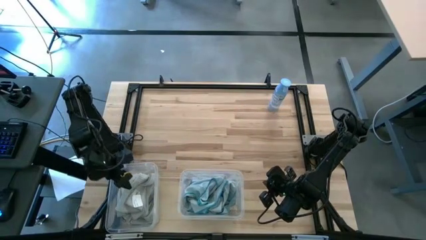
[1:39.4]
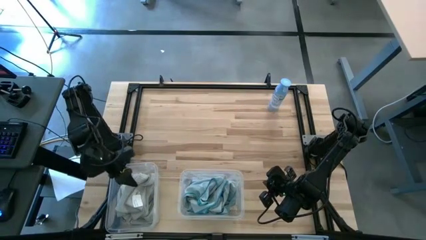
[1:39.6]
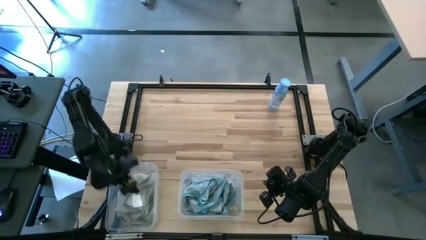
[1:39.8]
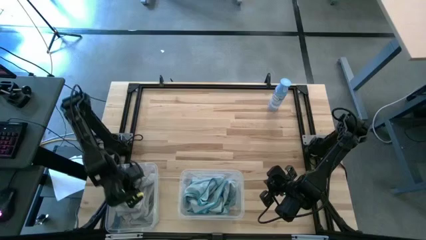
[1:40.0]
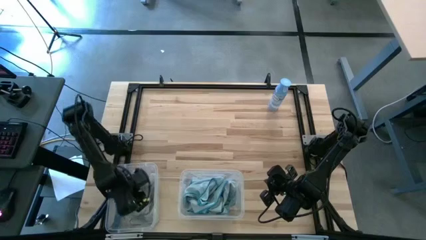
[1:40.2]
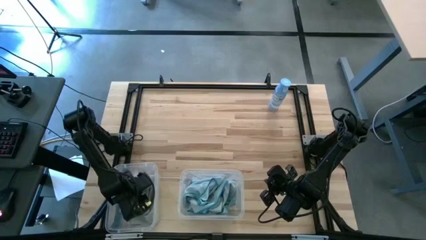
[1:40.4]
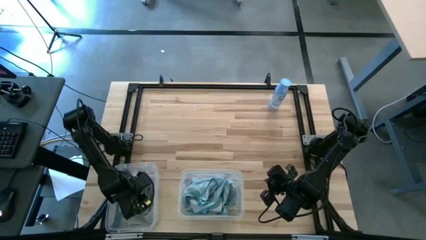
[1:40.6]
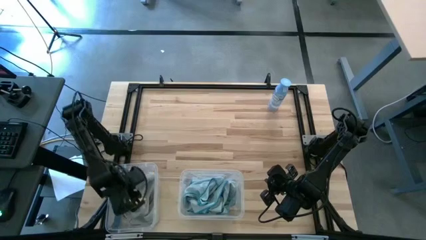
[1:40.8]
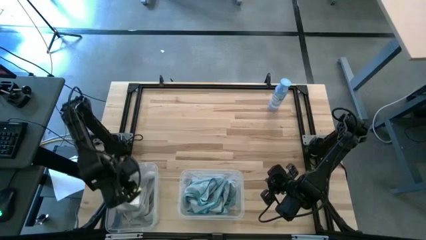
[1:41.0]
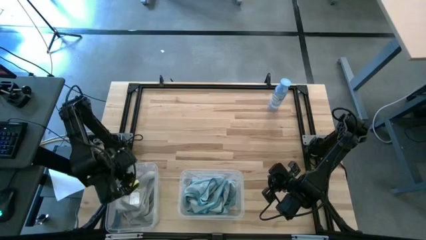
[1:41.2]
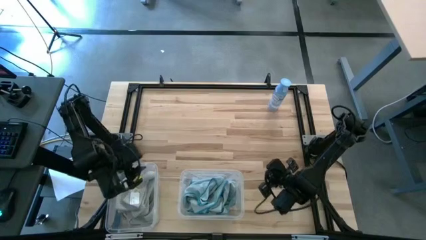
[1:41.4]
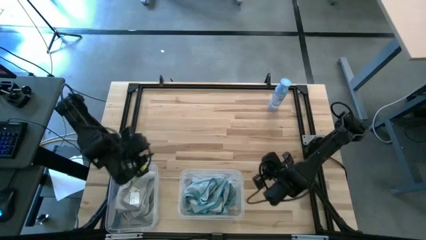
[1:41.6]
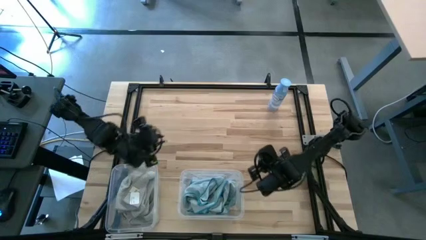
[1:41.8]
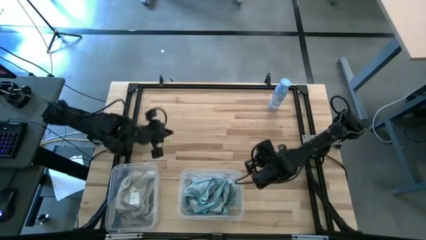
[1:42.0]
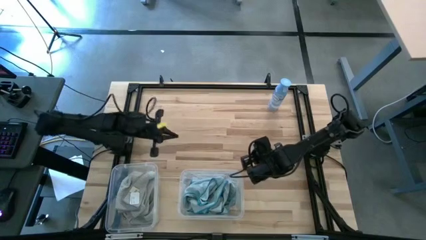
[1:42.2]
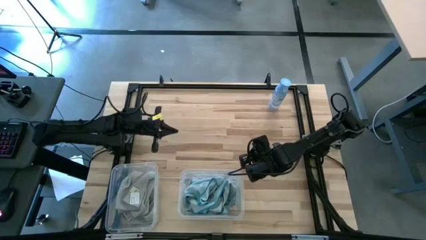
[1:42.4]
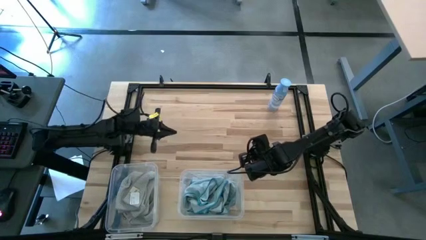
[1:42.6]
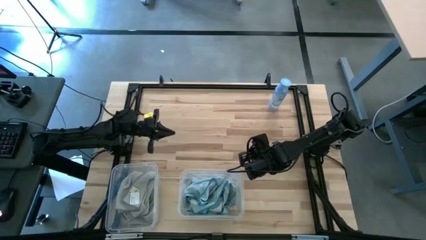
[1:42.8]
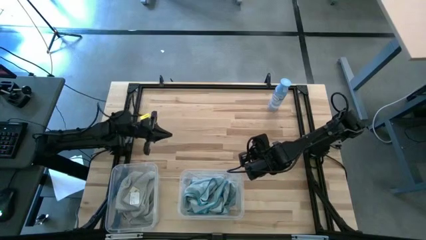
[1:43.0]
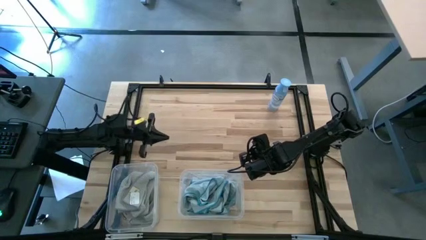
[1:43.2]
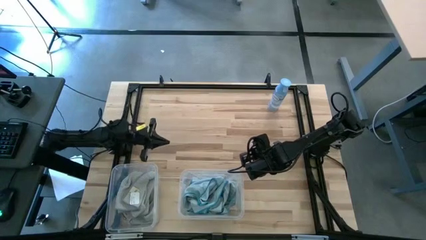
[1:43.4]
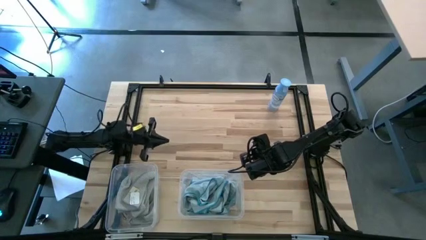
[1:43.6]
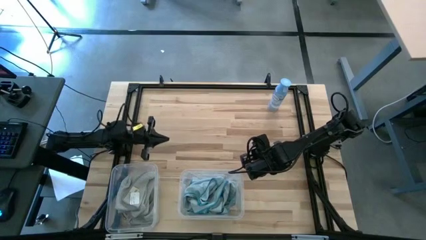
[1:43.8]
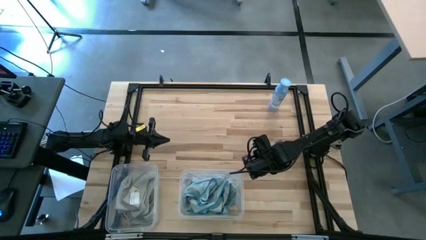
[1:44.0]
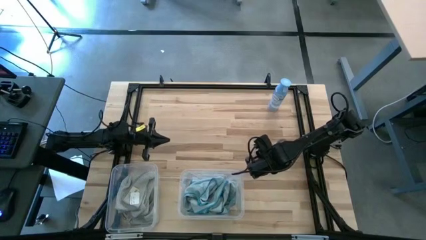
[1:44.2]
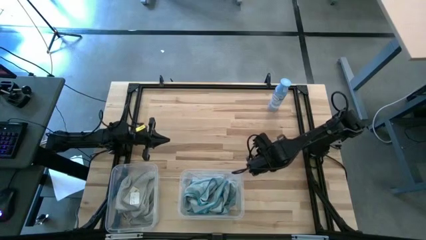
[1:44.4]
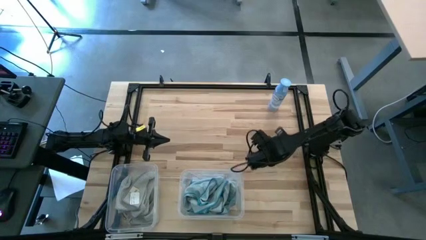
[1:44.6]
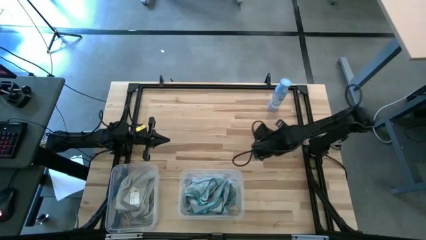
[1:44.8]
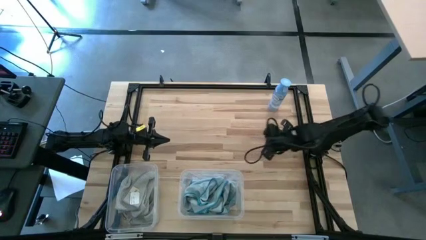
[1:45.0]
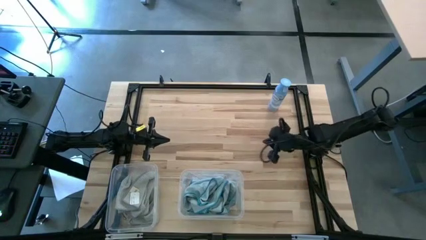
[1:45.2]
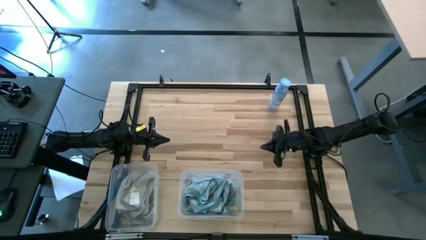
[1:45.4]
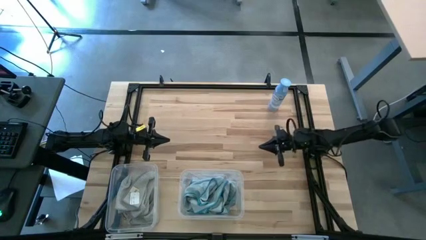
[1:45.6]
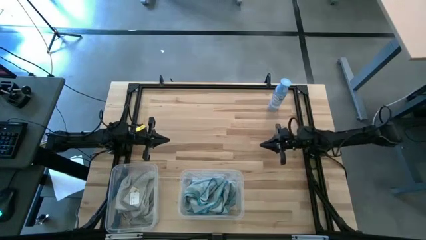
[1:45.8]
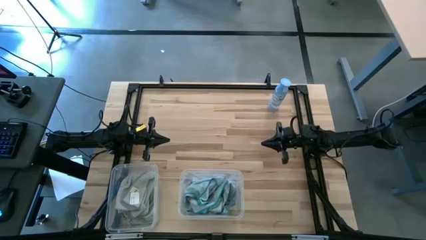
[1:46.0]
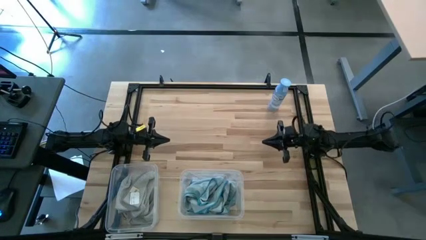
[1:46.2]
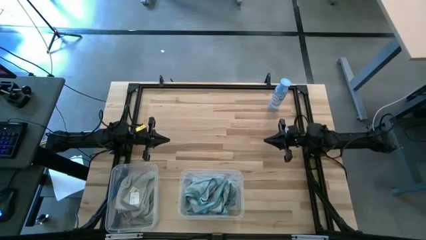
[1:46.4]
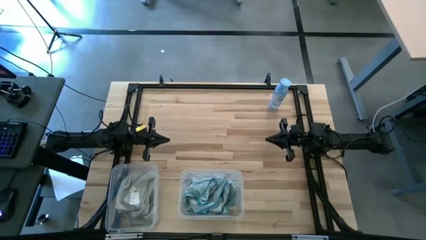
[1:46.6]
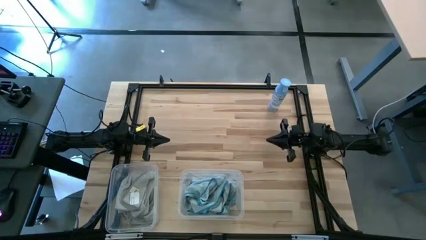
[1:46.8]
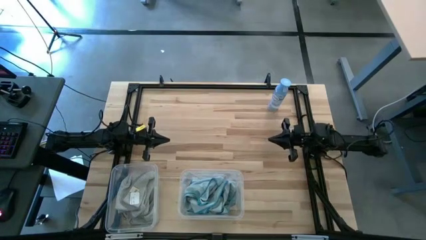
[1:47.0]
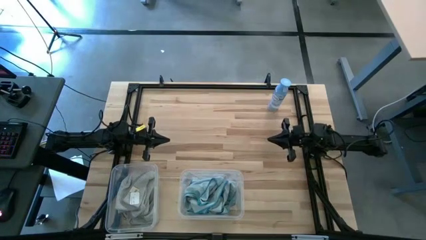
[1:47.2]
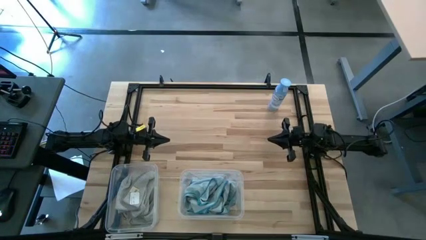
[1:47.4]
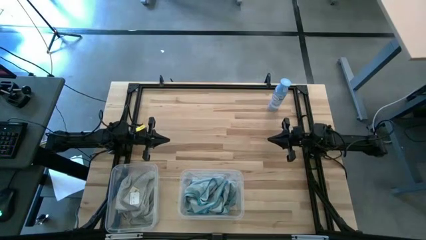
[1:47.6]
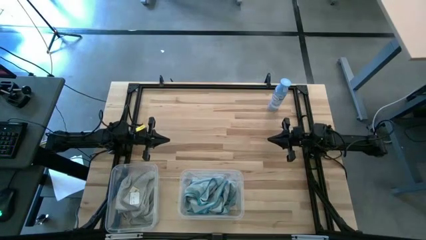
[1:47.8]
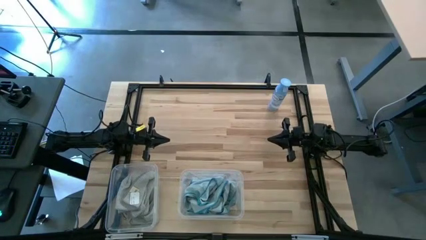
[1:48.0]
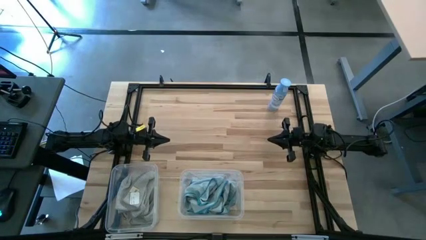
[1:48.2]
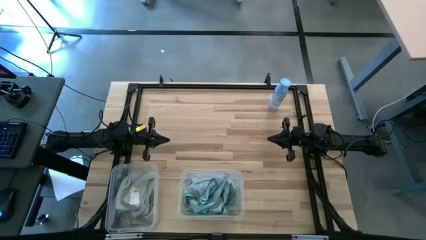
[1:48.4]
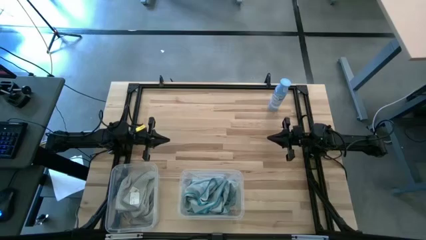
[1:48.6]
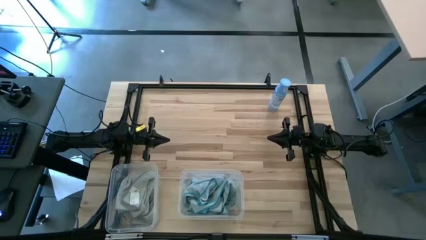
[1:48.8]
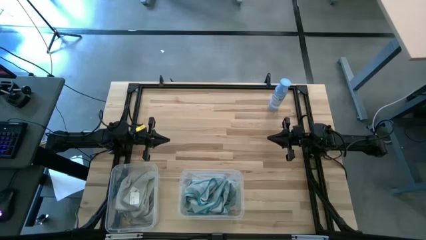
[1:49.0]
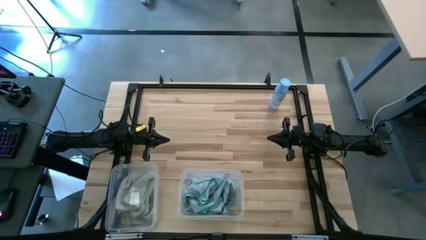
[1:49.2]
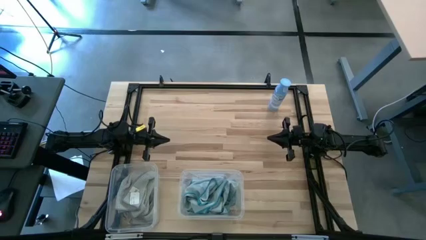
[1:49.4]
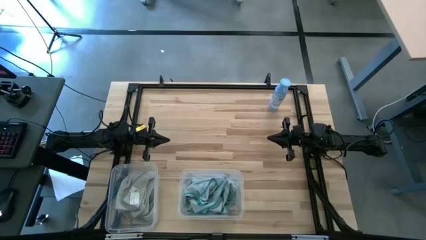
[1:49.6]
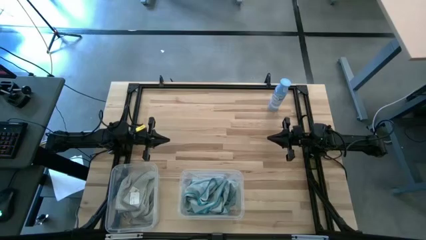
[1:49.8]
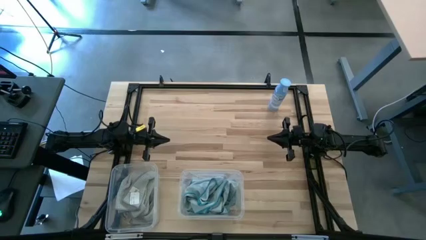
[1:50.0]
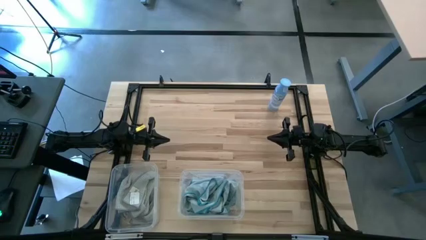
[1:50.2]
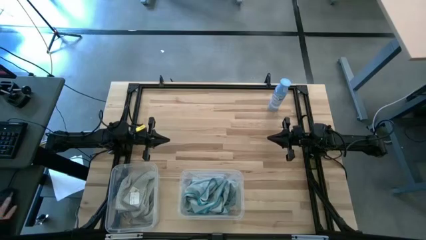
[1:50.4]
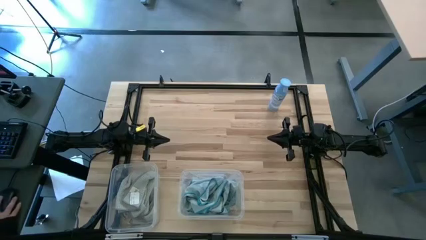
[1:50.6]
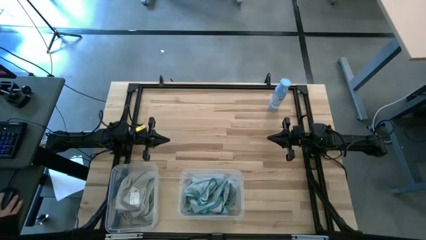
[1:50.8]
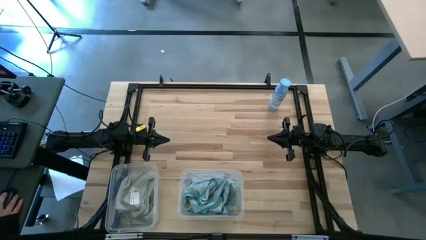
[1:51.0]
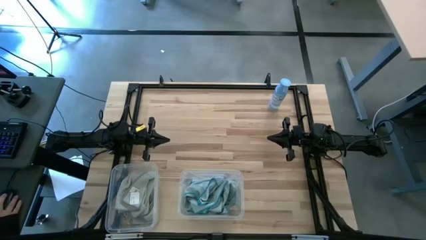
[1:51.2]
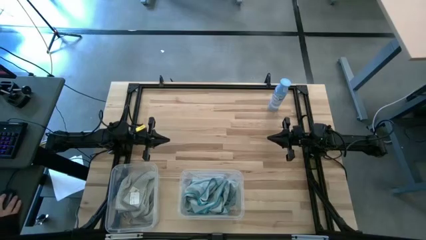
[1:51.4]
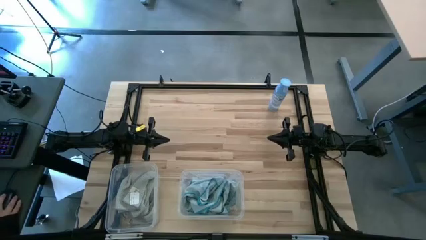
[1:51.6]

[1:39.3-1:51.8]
Task: Sort microfiber towel by color & place in baskets
Return to Home Position

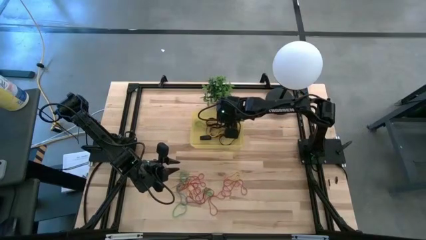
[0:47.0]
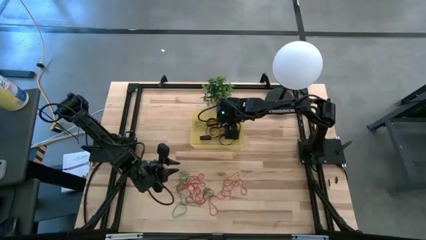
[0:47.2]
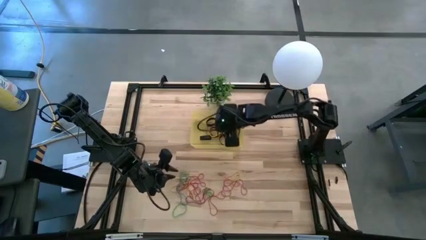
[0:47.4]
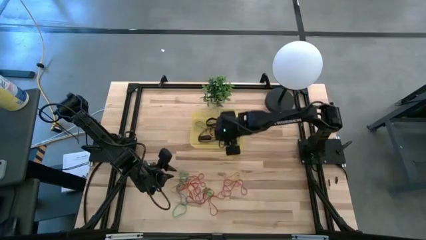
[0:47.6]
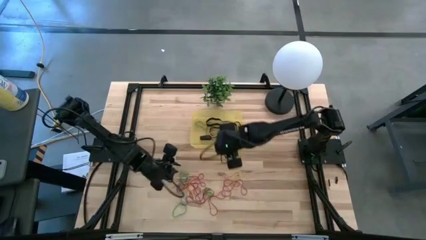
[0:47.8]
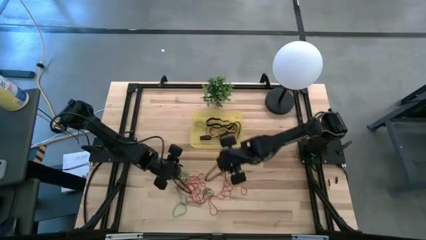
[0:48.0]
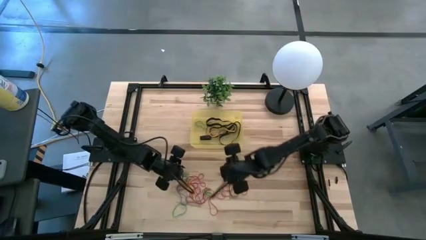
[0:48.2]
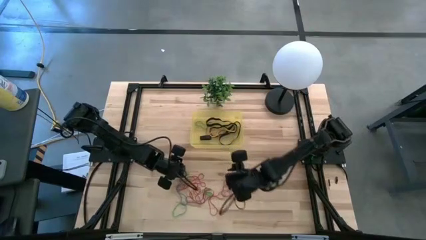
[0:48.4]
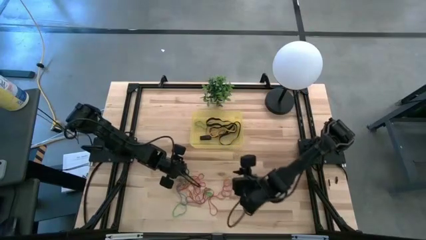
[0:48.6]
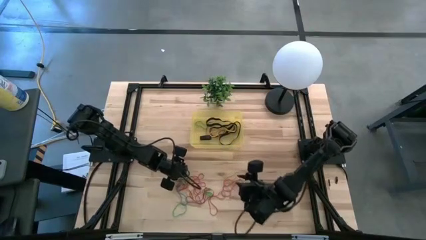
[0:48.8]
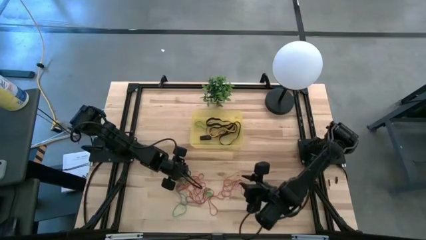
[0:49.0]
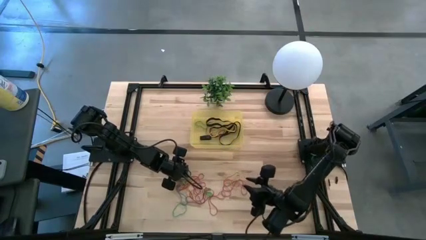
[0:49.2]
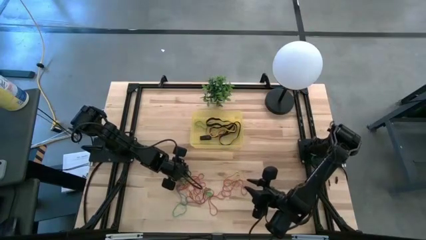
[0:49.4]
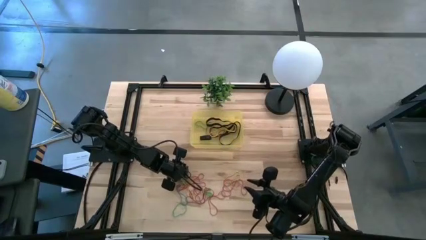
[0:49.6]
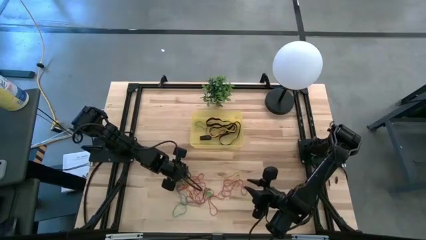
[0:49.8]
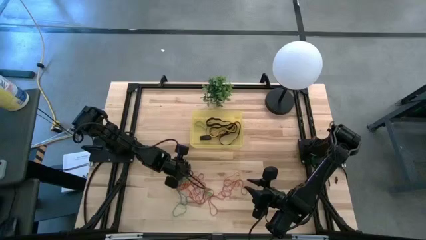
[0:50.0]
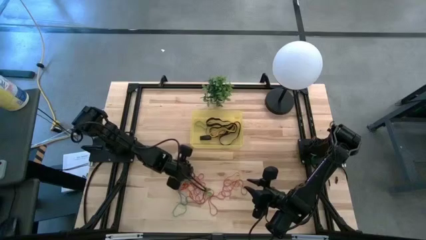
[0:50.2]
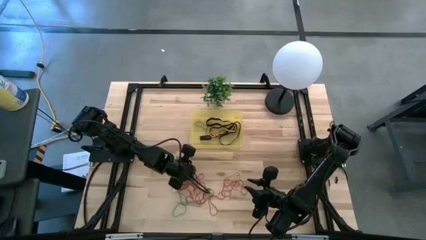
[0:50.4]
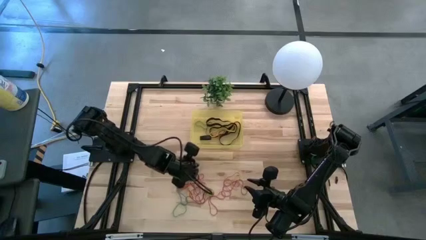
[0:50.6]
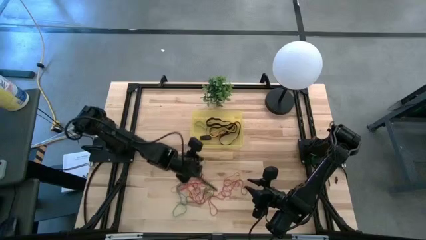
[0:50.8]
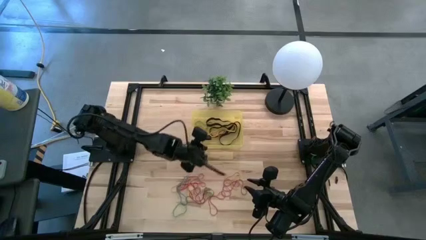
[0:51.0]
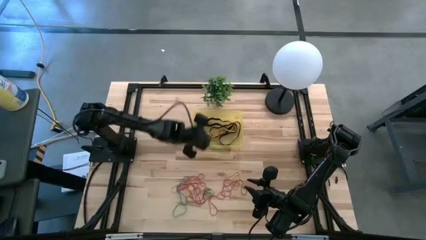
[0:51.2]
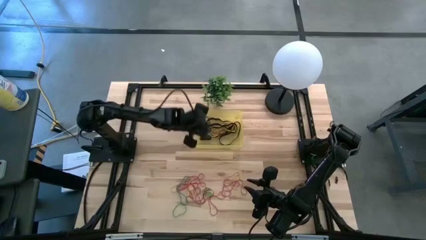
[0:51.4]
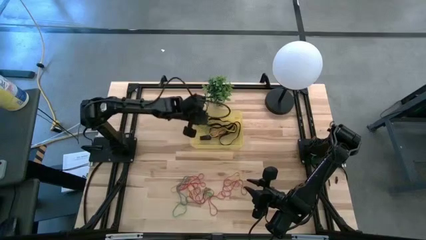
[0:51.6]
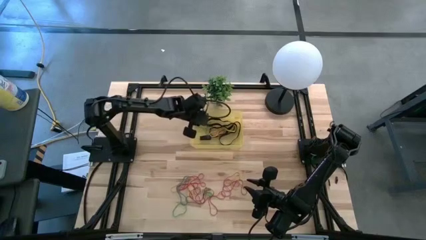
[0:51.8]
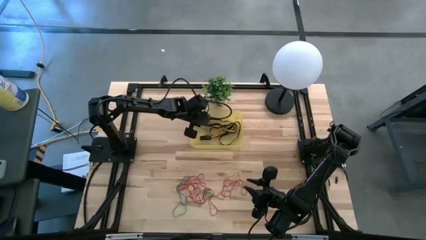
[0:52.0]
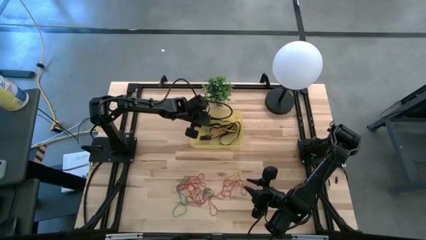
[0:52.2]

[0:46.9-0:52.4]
Task: Pick and place rubber bands into bin
Put the green rubber band into the yellow bin
